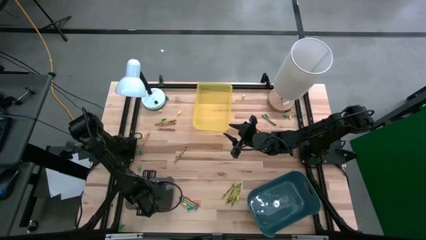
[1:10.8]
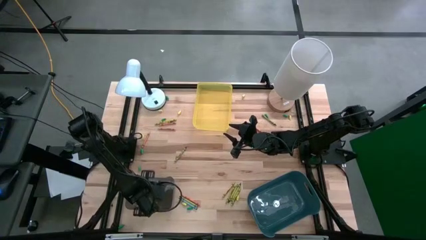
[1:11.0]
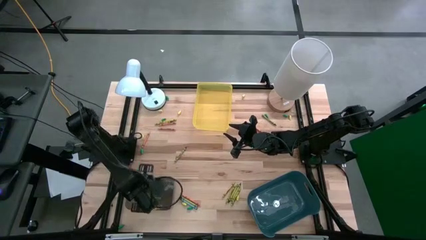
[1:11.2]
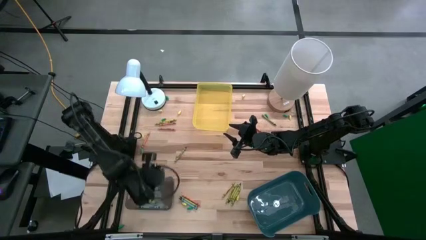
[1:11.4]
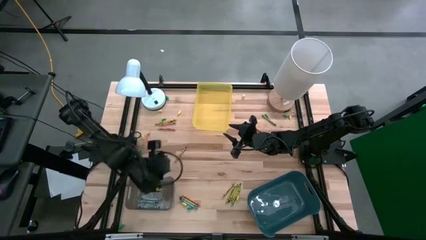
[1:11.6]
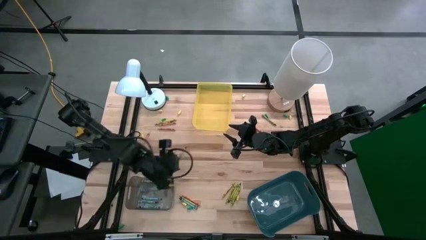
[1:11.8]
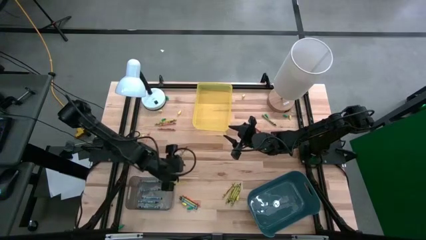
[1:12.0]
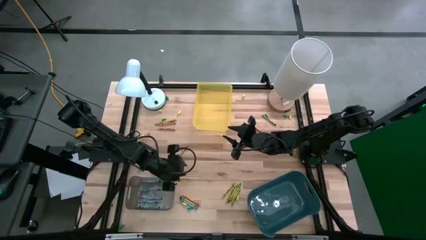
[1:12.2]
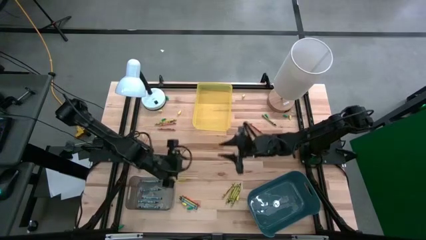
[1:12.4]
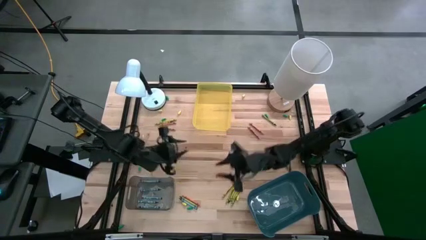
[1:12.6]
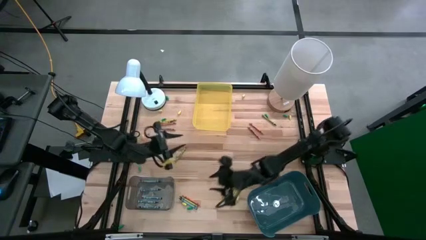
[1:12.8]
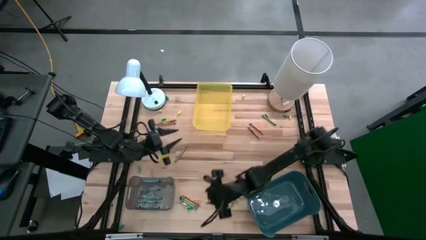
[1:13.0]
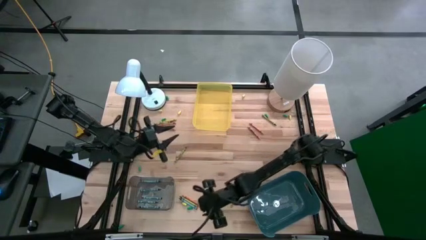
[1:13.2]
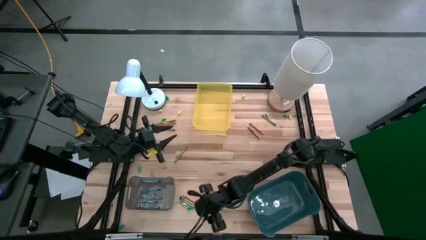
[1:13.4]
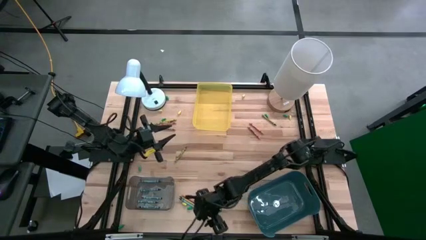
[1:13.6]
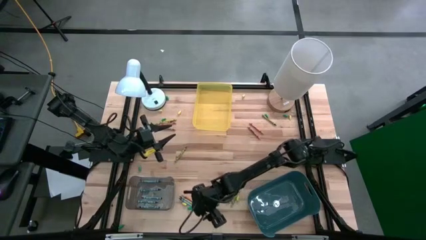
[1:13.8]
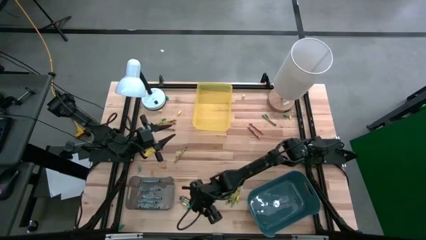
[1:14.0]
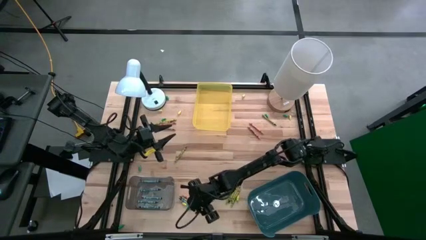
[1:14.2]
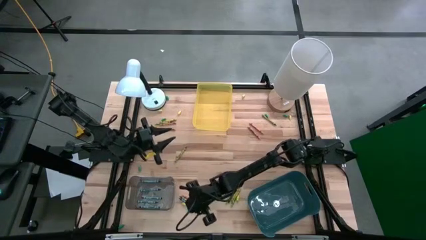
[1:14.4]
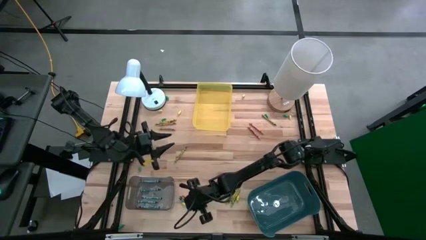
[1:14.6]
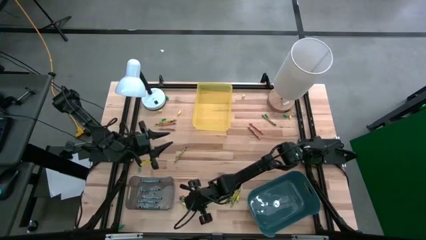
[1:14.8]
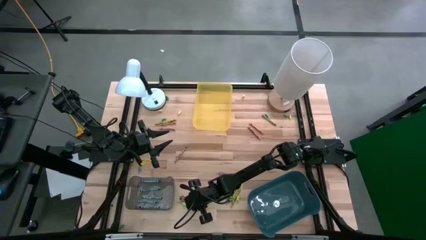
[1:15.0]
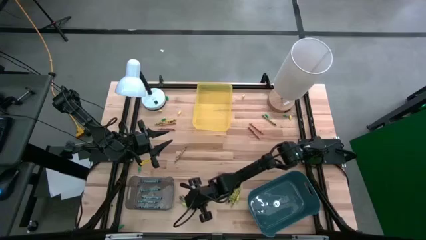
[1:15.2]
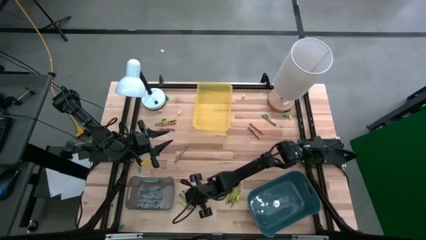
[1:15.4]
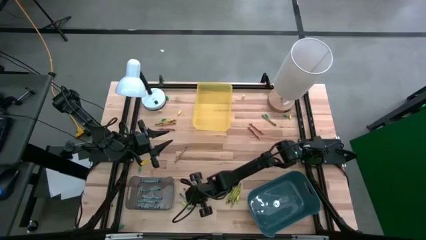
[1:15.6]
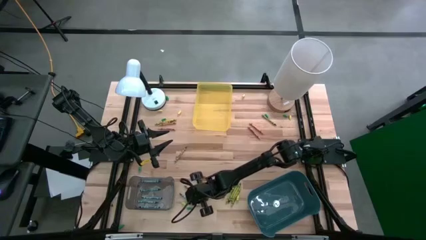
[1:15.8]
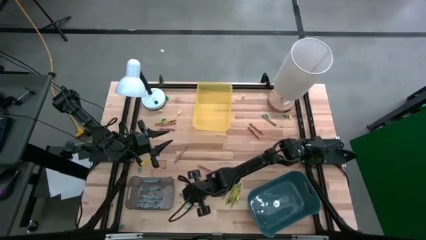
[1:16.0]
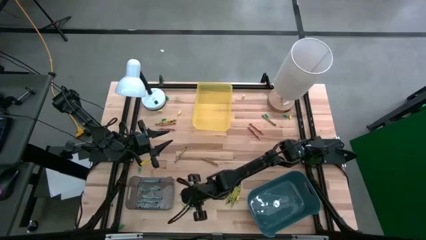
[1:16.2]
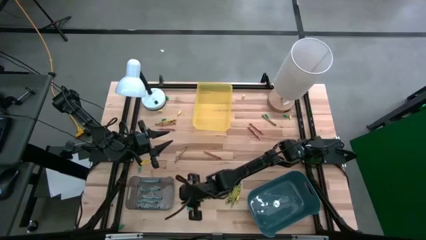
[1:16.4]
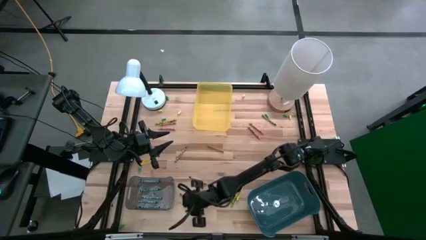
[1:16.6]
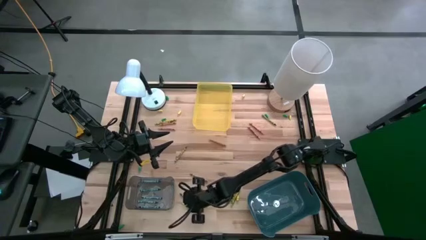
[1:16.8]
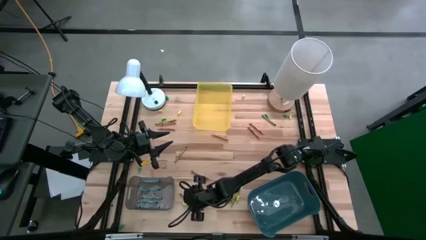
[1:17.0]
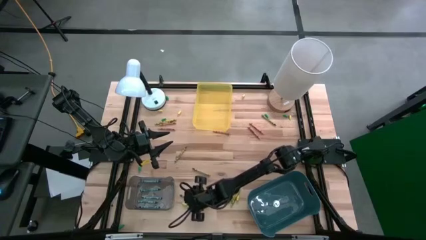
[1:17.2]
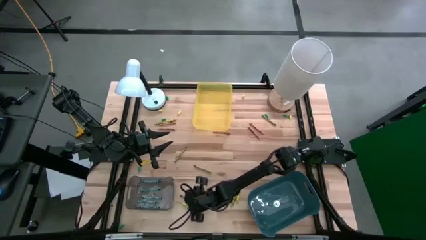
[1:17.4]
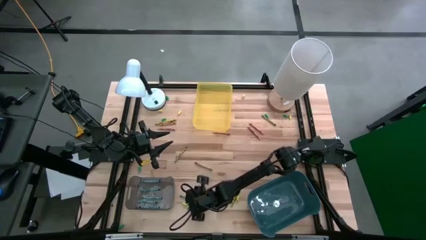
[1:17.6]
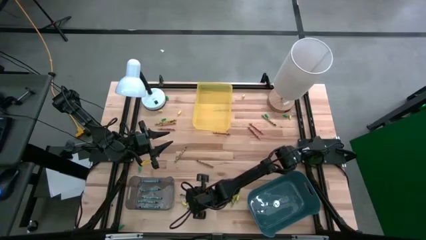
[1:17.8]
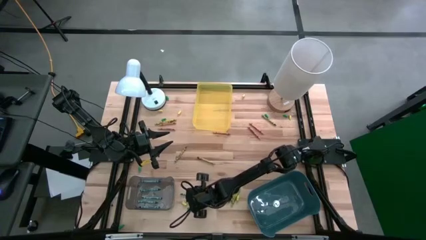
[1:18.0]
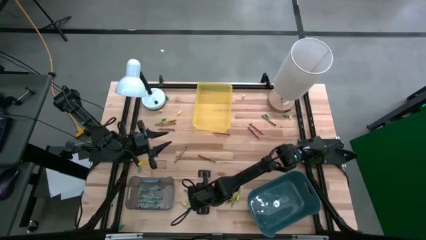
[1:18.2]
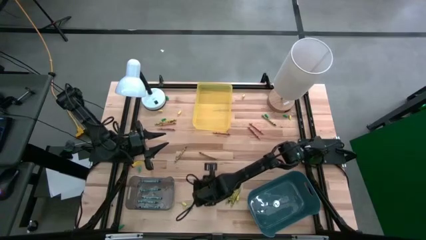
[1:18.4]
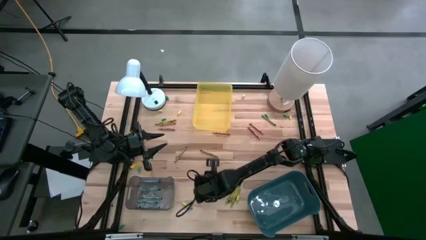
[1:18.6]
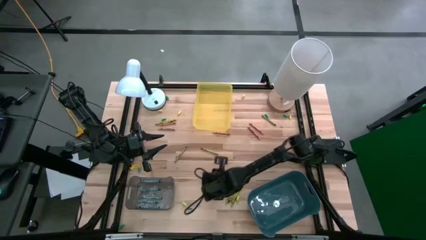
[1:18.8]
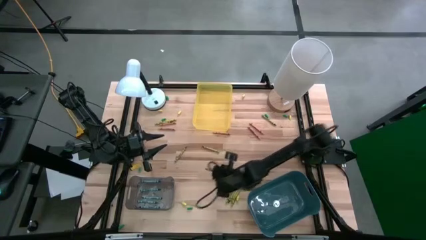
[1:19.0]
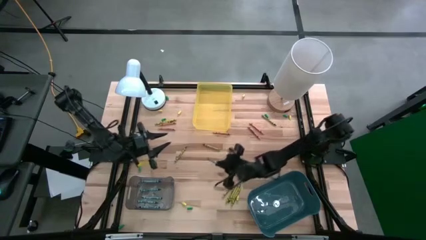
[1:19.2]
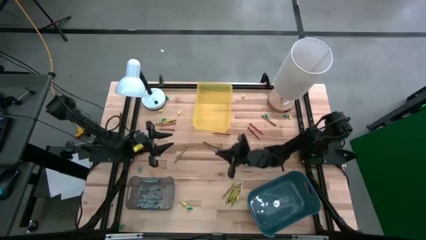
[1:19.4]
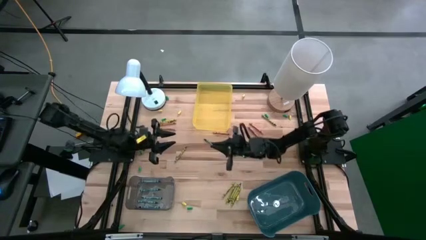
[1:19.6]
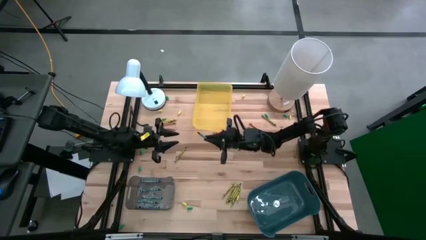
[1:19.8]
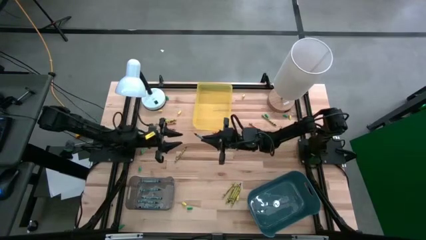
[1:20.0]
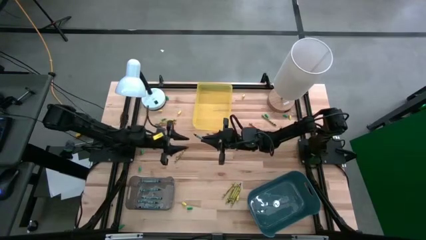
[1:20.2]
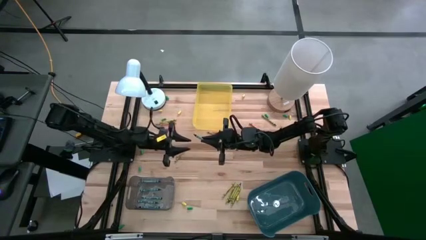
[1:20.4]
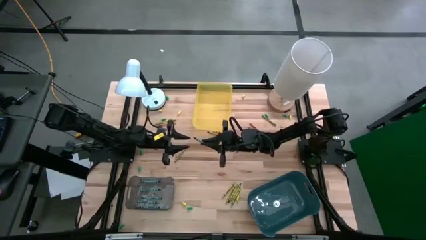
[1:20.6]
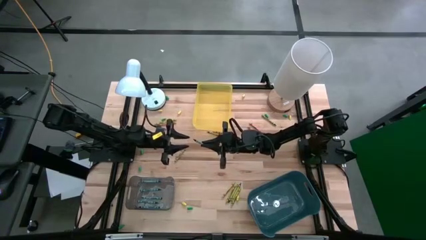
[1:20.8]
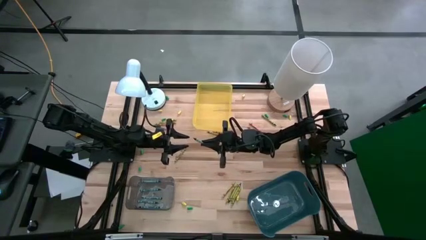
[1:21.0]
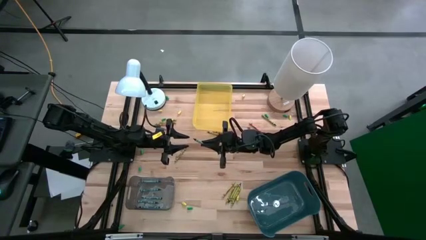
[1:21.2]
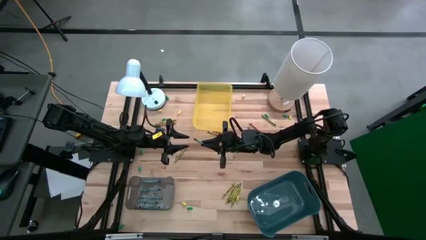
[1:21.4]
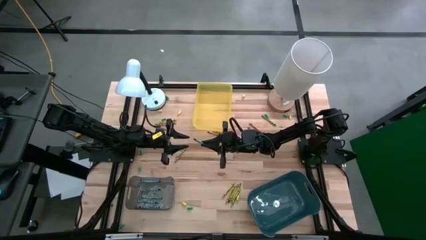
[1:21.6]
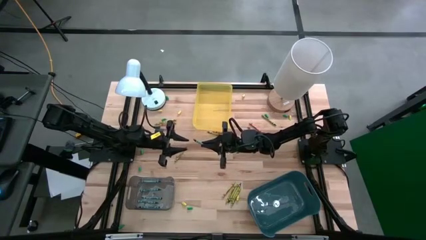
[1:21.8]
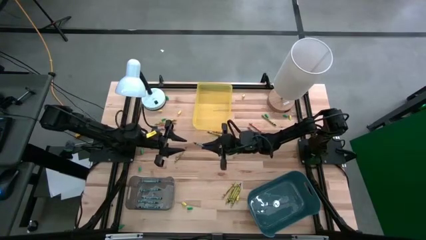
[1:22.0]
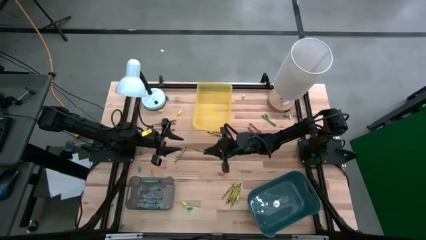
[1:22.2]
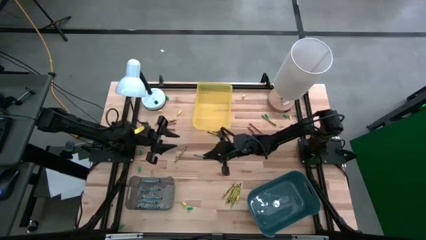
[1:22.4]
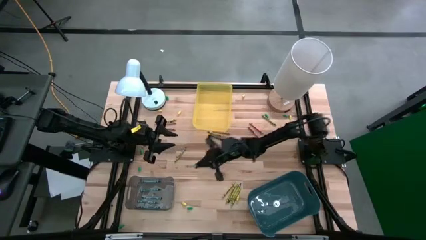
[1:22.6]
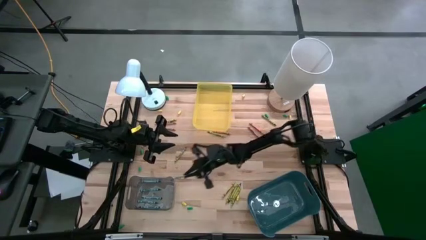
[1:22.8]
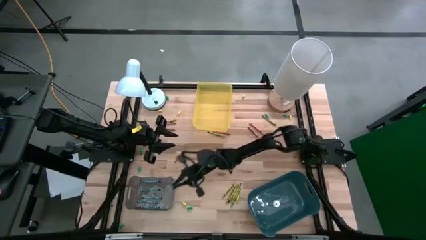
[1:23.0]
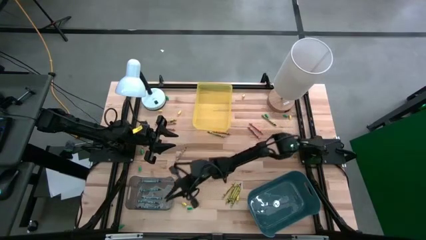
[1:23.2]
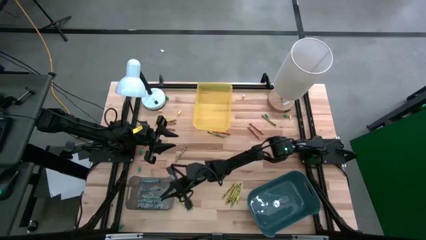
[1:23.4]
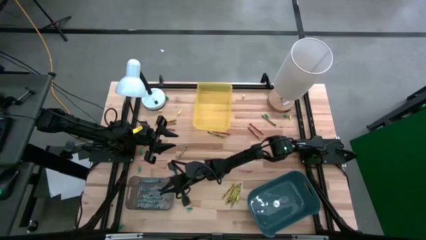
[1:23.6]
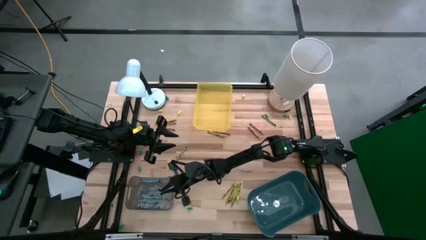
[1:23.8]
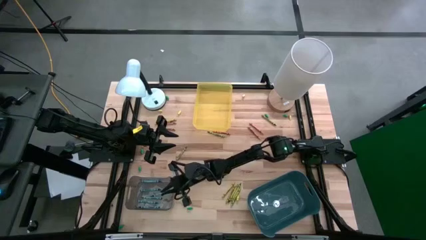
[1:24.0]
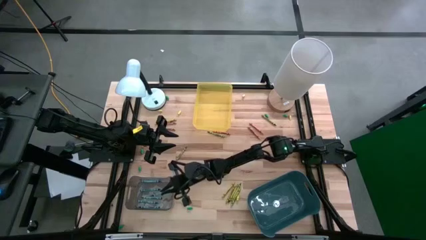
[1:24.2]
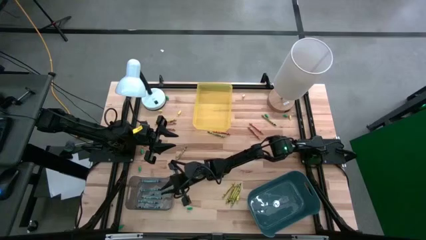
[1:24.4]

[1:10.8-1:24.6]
Task: Sort crayons
Put the blue crayon into the black bin
